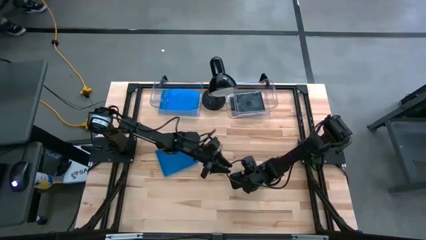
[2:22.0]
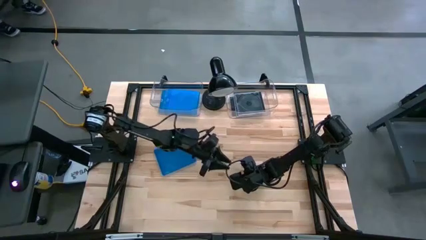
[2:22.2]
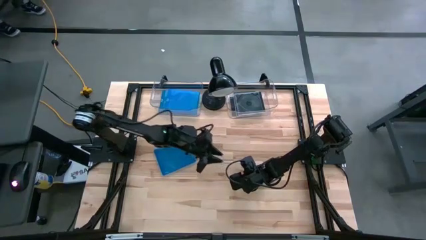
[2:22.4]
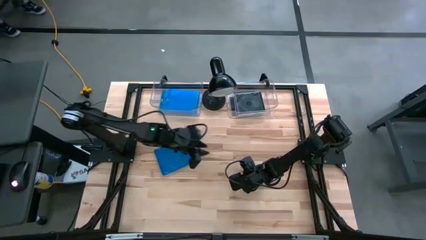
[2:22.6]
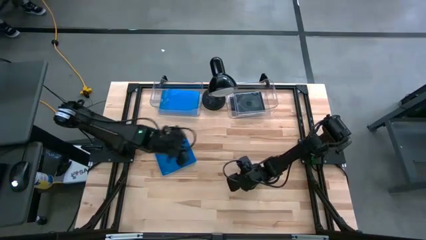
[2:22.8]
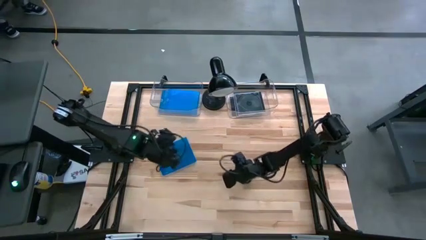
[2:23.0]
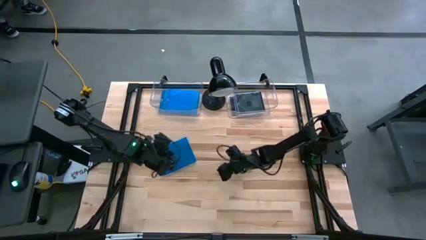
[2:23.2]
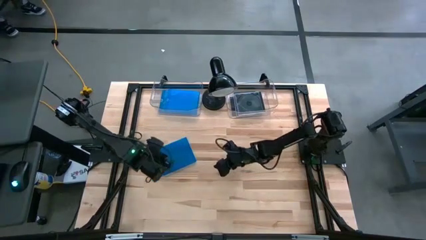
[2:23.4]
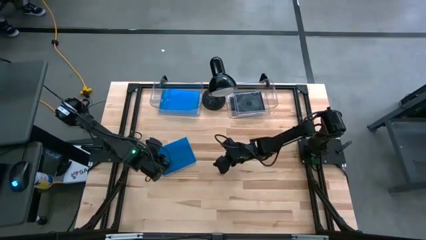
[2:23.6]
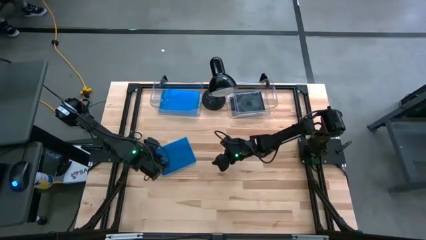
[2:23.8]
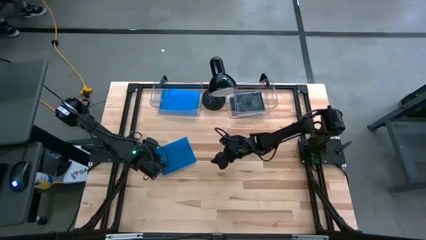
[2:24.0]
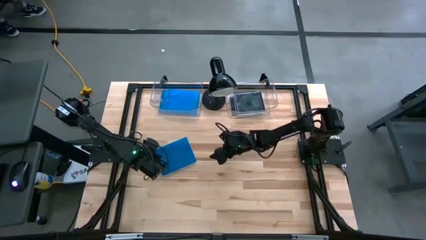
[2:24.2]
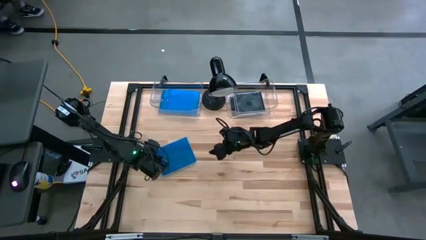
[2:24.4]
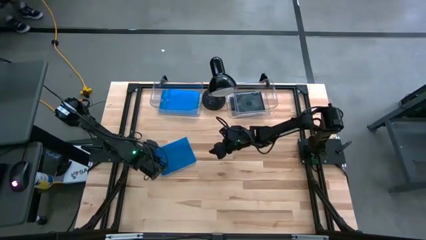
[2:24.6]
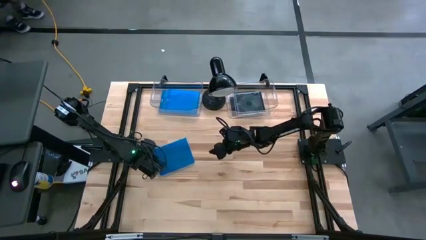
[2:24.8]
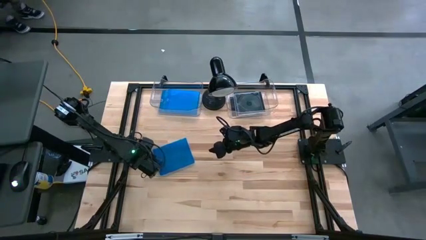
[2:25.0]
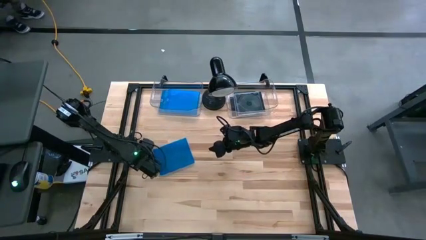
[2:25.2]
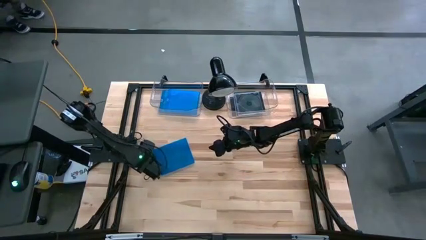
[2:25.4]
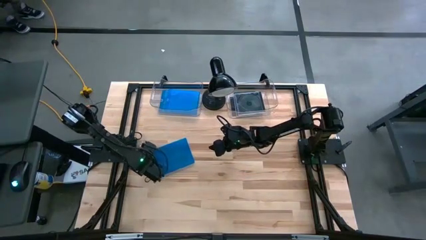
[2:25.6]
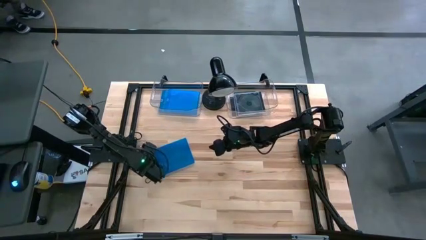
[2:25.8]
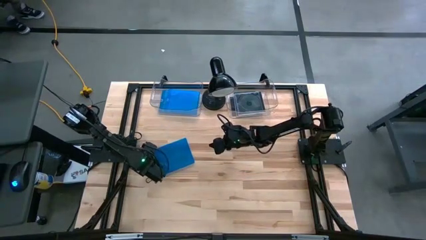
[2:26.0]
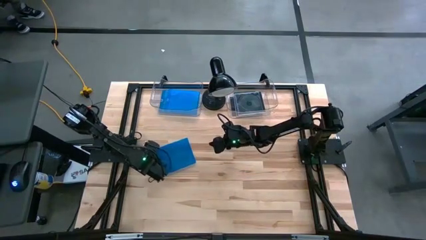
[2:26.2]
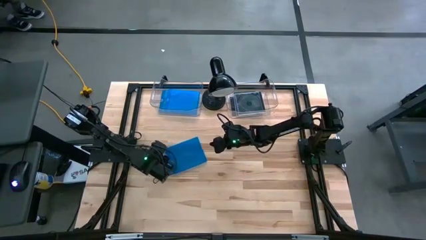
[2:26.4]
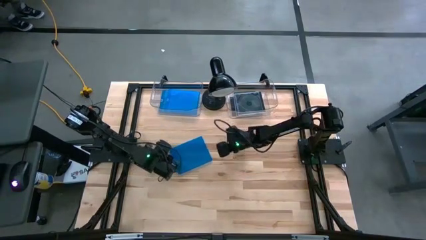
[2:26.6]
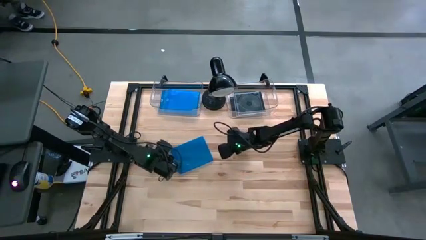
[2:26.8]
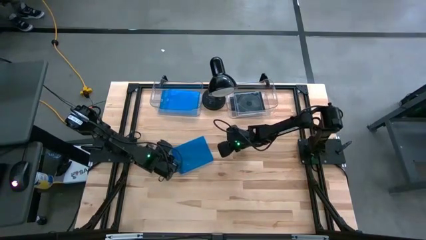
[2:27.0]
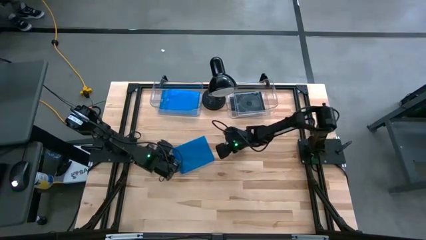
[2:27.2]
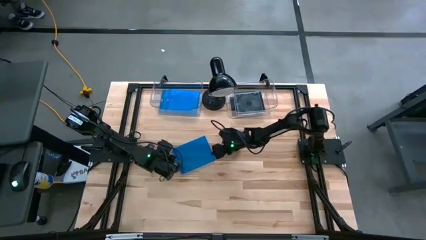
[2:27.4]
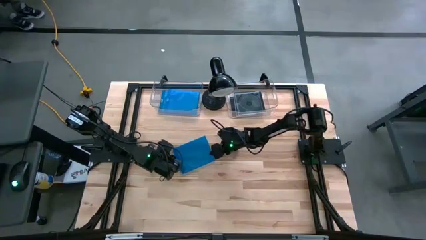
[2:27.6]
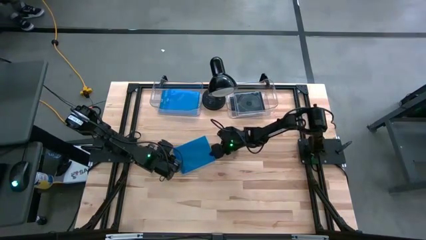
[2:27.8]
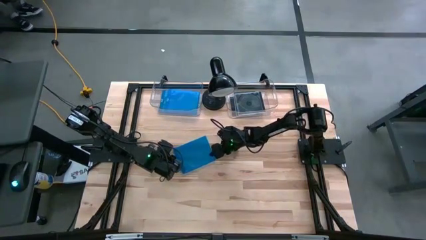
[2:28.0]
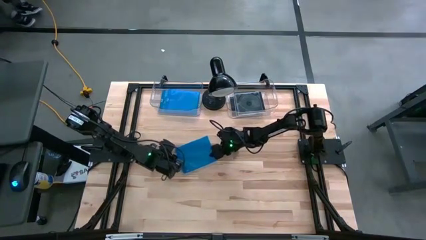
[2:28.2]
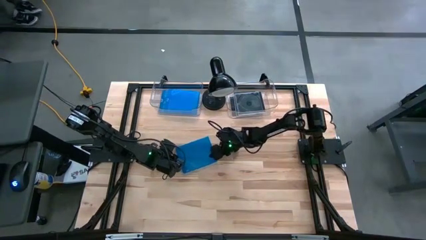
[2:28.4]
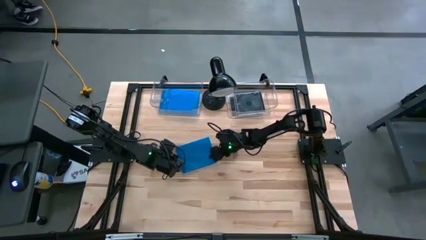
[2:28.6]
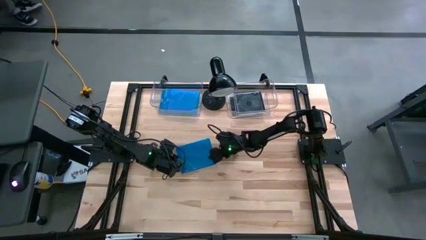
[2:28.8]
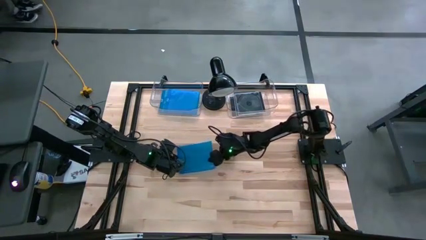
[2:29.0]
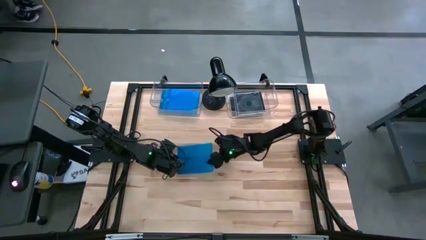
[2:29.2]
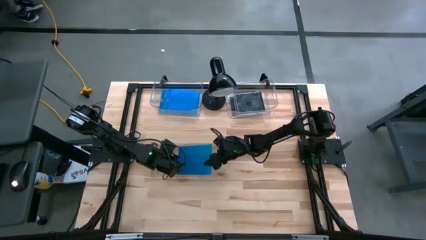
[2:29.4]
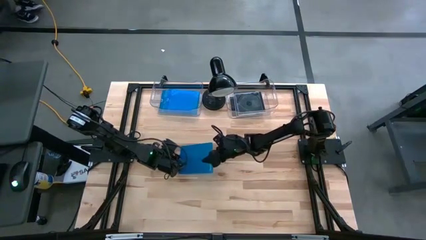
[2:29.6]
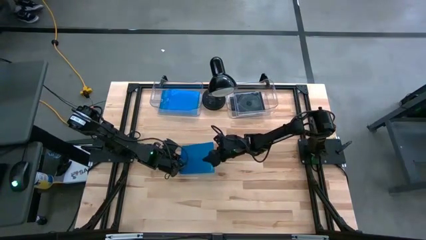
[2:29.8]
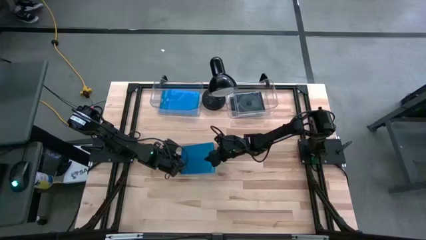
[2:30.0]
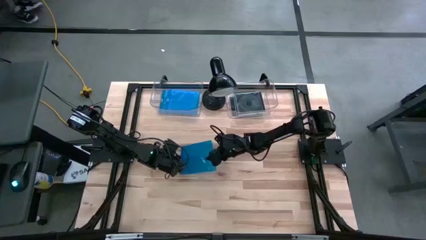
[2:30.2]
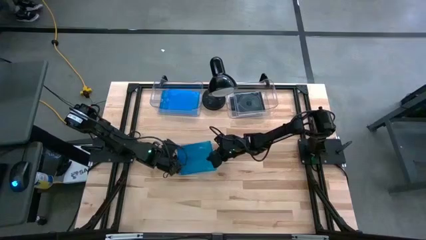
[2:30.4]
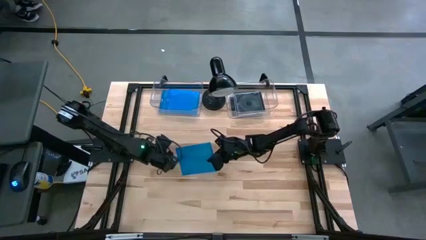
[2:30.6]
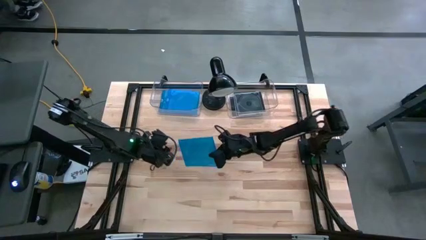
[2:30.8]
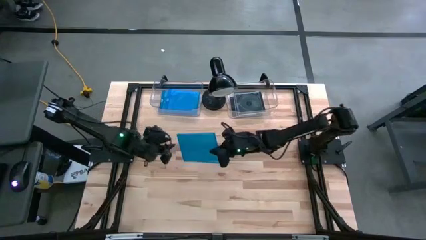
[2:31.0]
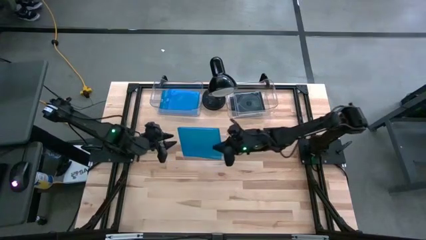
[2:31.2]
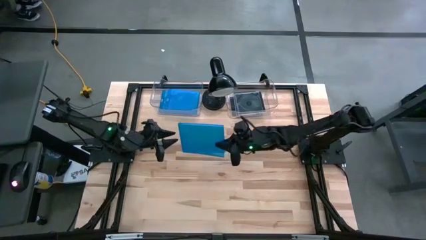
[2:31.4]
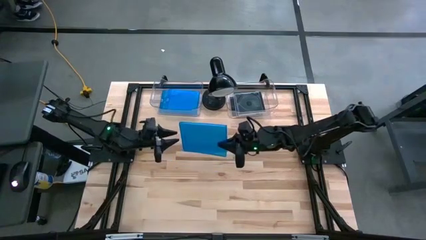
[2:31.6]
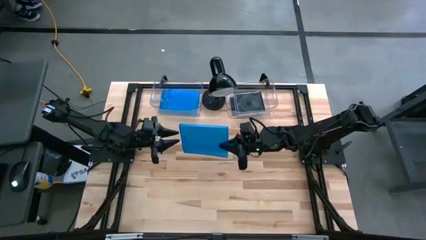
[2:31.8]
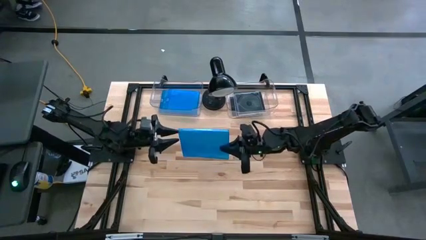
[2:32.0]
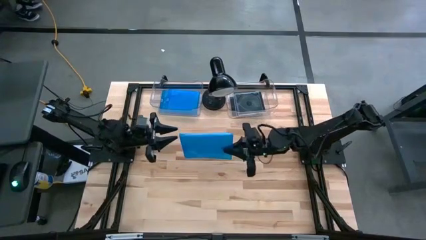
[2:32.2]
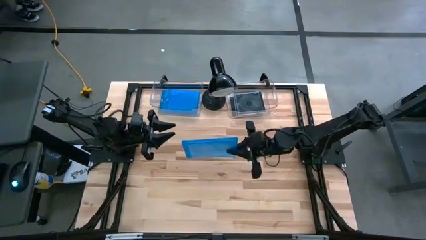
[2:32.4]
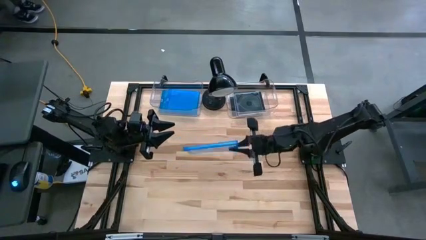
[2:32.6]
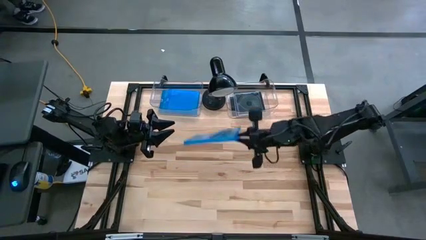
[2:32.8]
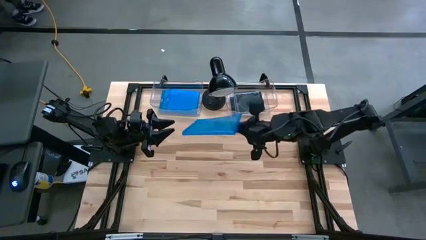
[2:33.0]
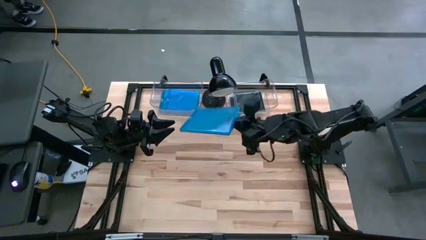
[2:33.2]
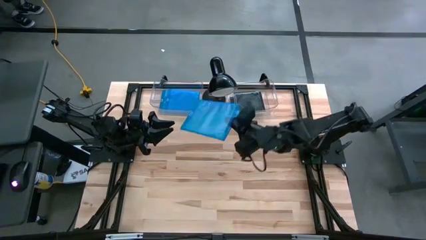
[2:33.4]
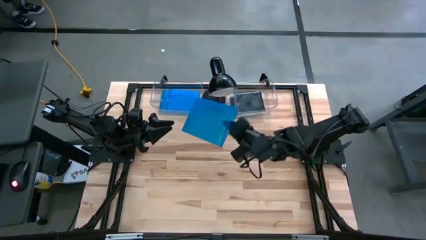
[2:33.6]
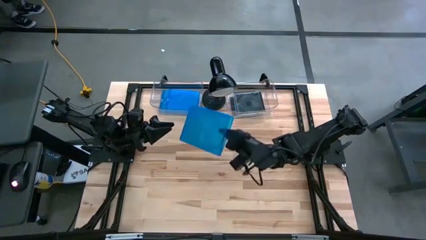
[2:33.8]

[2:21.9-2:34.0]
Task: Pick & place jewel cases by type
Put the blue CD case into the left transparent bin

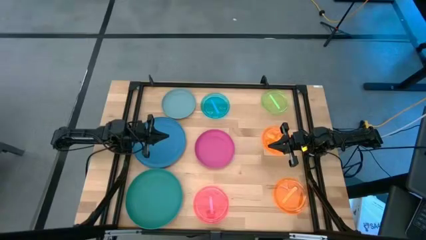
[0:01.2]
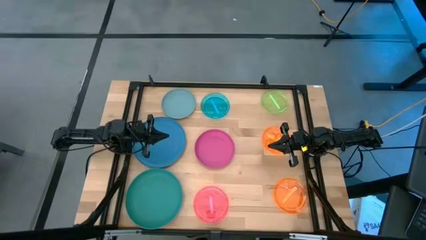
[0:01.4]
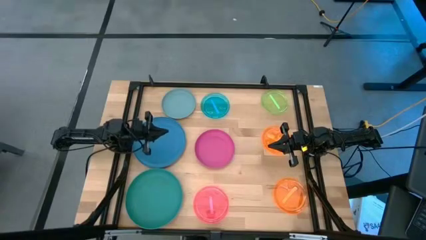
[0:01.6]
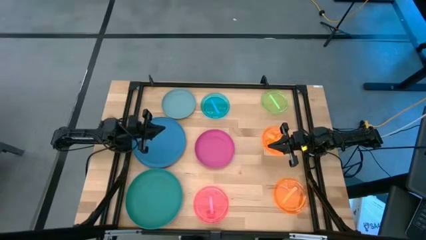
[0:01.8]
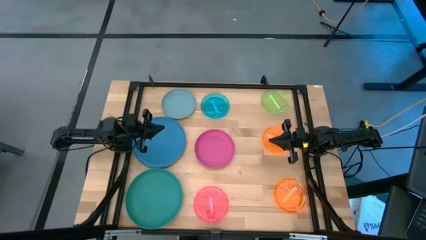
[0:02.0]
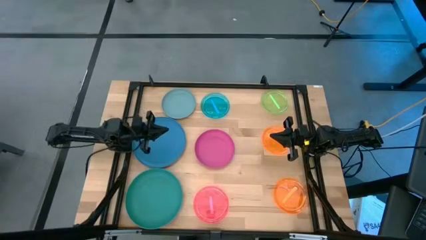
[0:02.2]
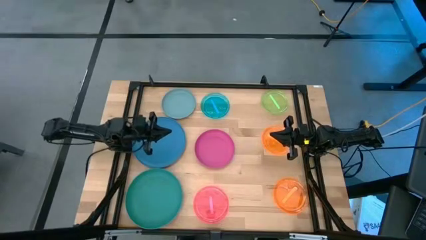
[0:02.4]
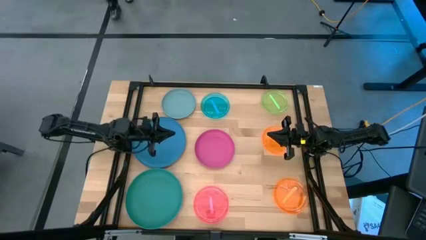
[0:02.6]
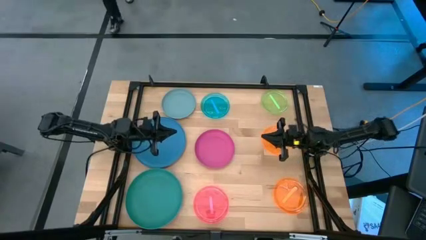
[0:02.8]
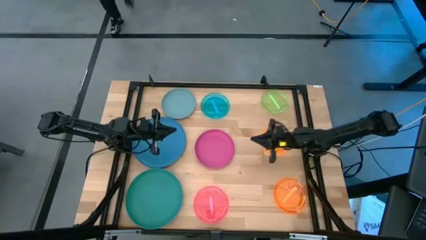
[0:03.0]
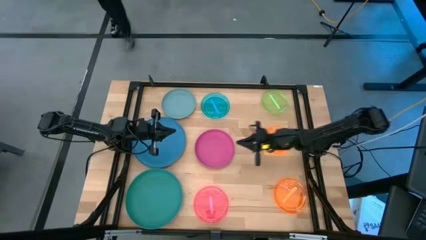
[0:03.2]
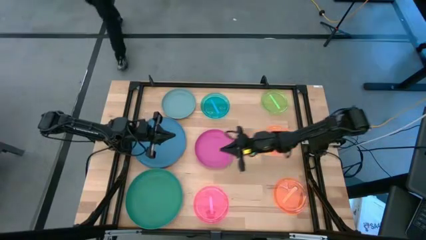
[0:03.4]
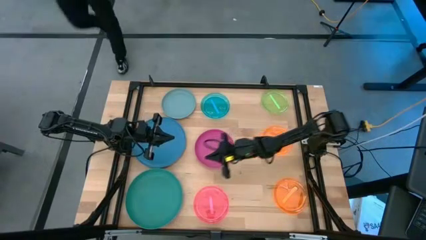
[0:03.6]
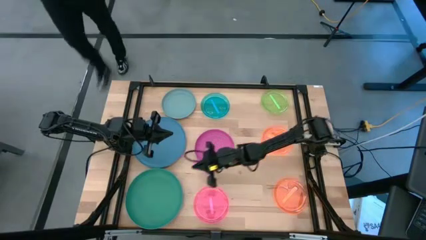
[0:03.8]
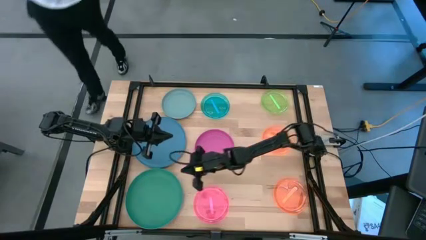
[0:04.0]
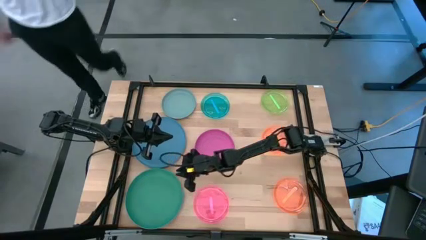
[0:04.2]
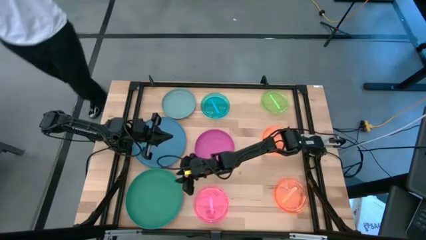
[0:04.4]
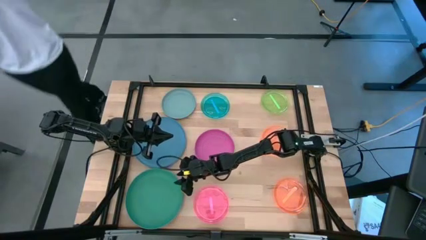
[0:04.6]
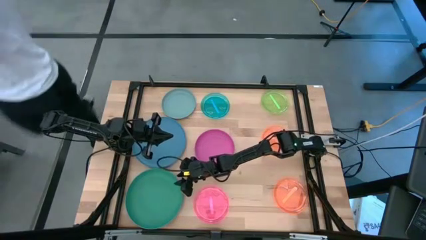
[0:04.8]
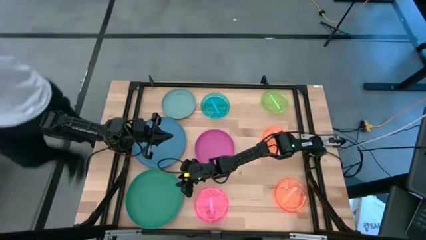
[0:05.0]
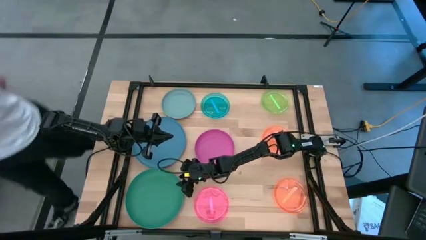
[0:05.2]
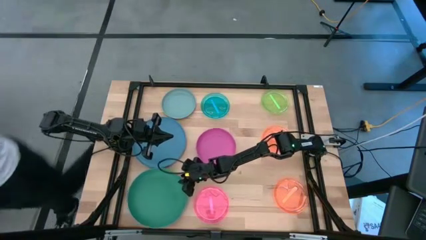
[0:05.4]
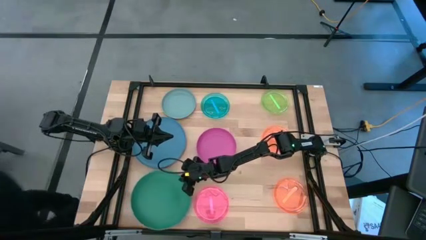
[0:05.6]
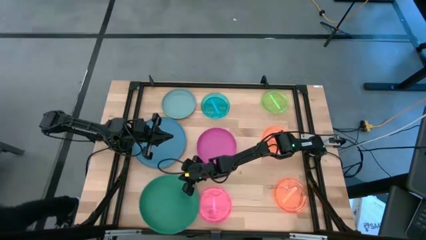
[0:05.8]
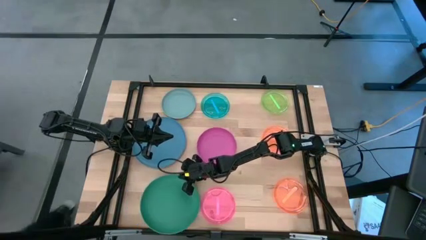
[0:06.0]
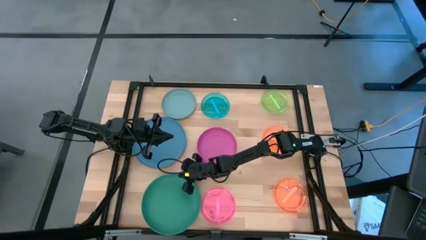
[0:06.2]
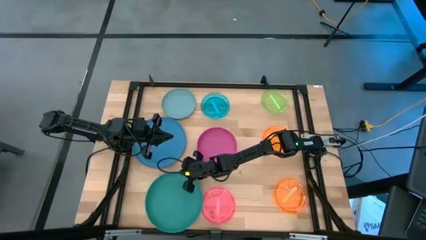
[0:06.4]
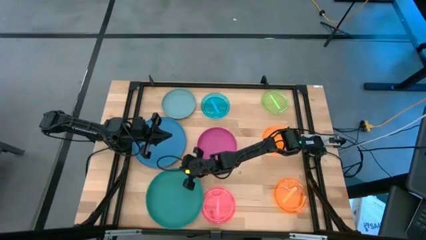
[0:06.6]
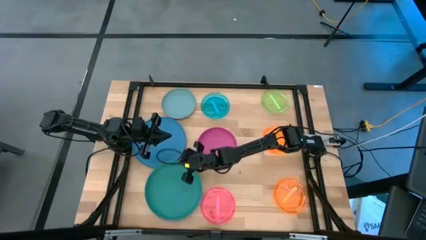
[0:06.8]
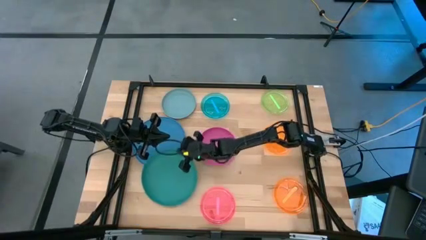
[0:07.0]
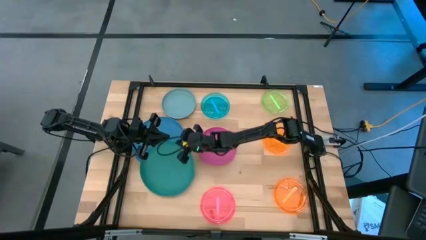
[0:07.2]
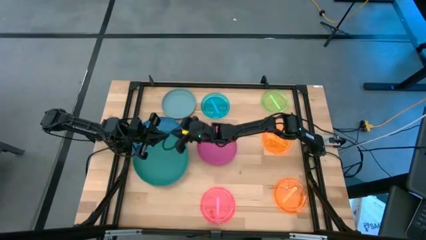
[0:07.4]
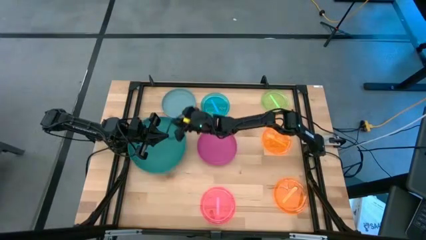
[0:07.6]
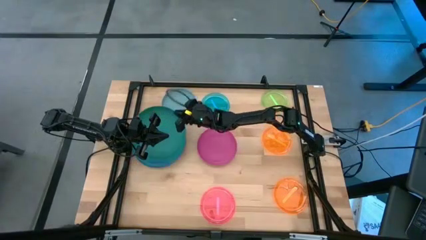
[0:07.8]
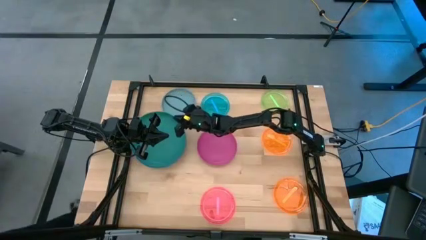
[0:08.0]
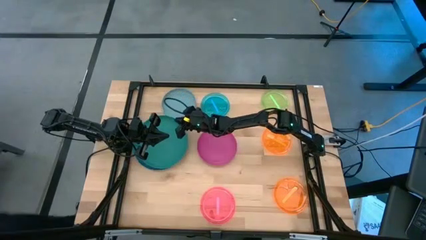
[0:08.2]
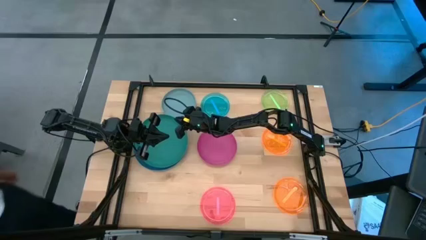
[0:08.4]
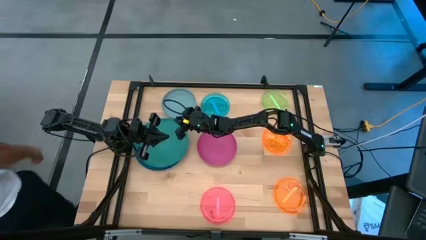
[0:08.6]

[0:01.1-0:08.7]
Task: Stack plastic plates
Stack the dark green plate on top of the blue plate
